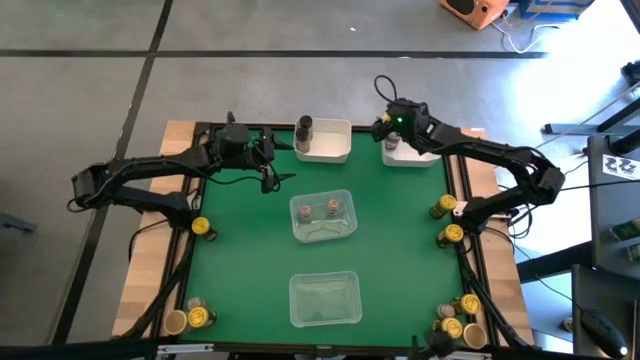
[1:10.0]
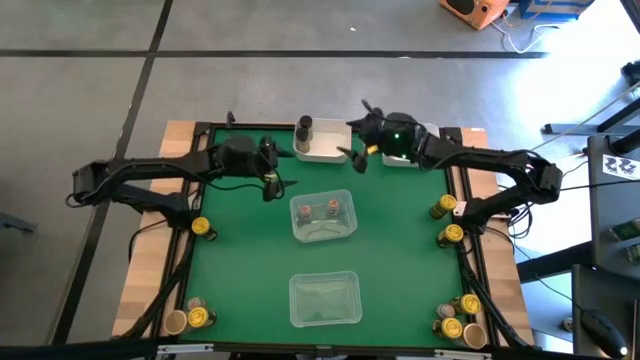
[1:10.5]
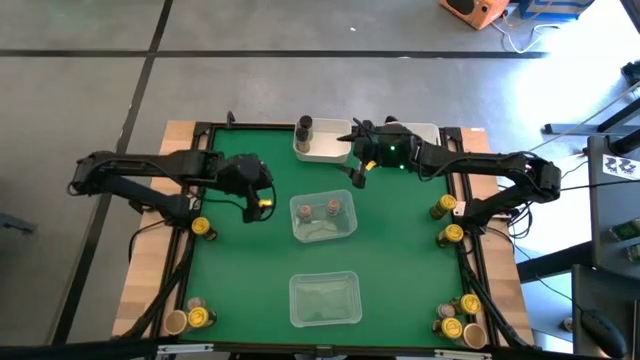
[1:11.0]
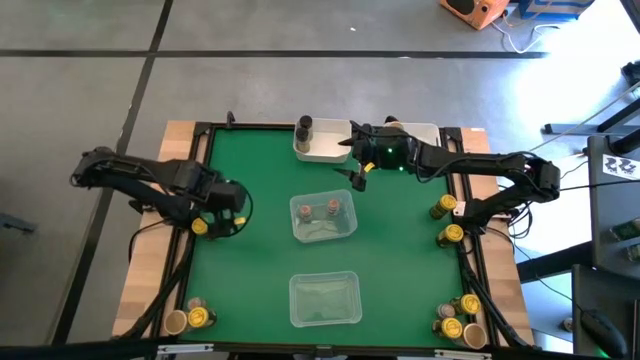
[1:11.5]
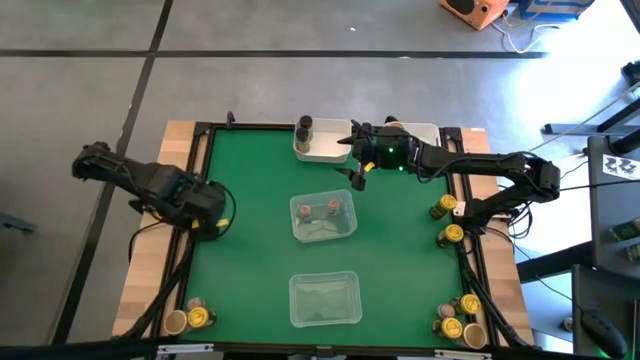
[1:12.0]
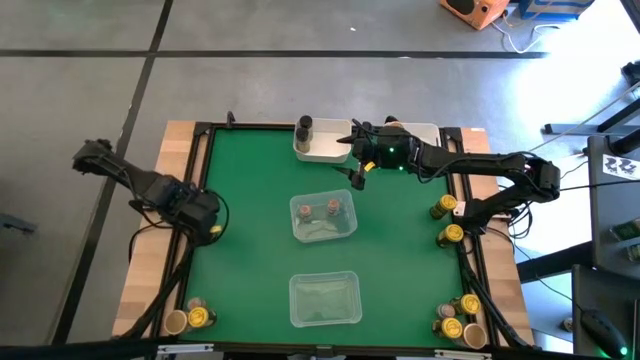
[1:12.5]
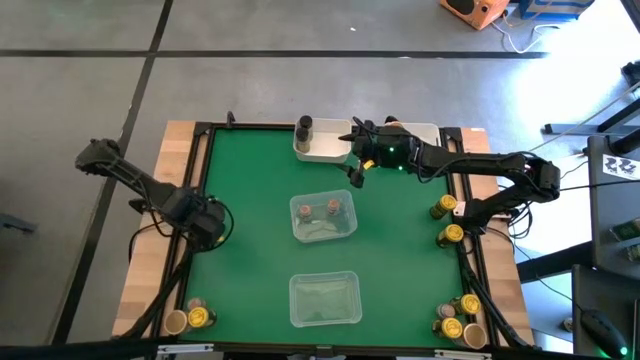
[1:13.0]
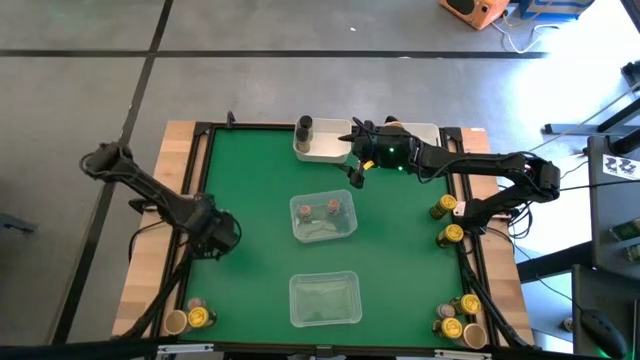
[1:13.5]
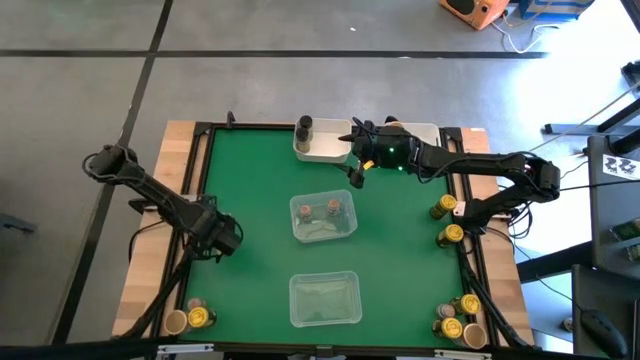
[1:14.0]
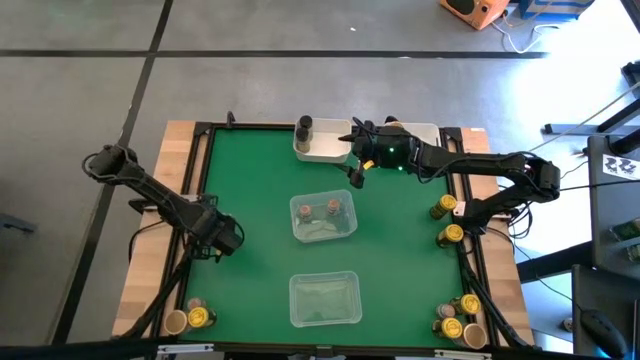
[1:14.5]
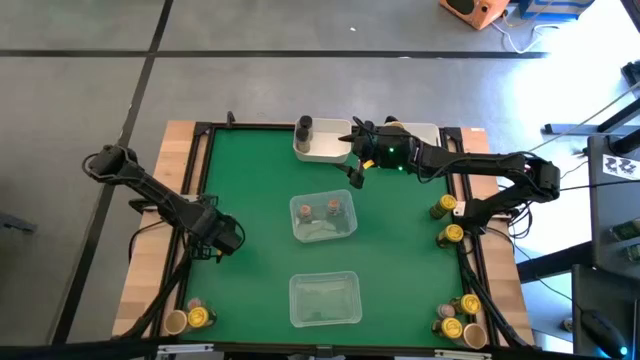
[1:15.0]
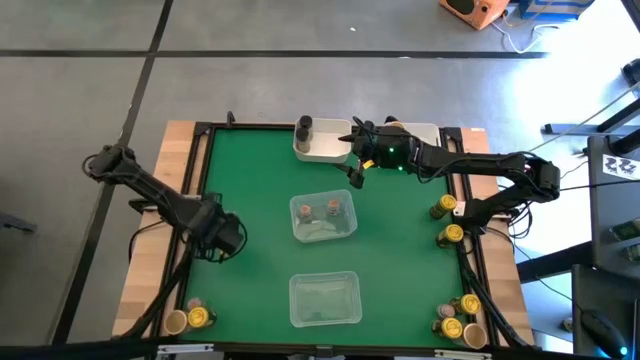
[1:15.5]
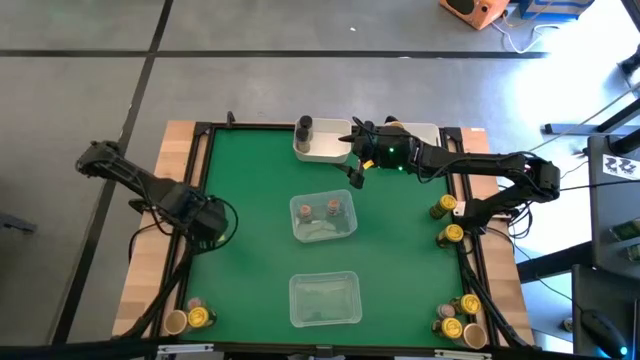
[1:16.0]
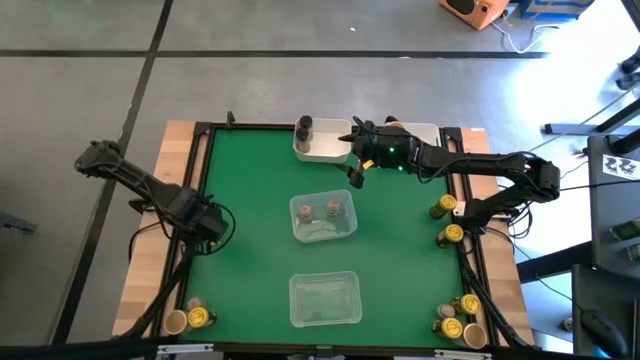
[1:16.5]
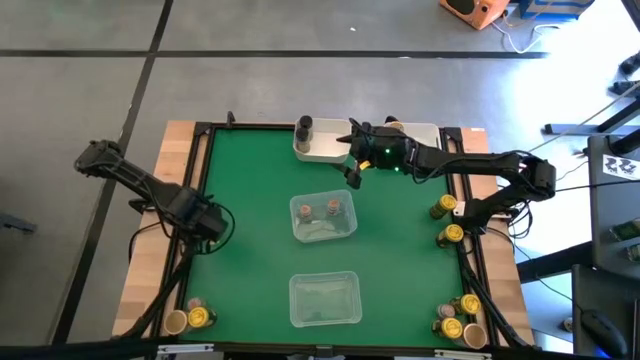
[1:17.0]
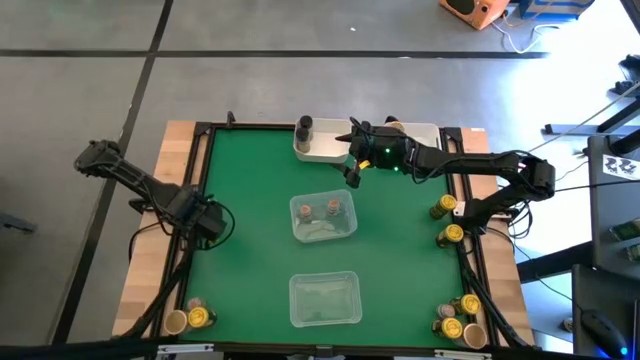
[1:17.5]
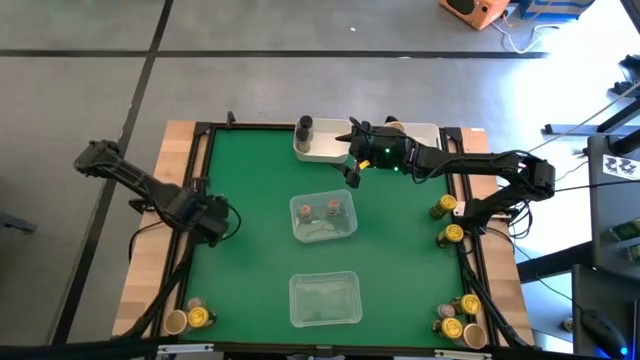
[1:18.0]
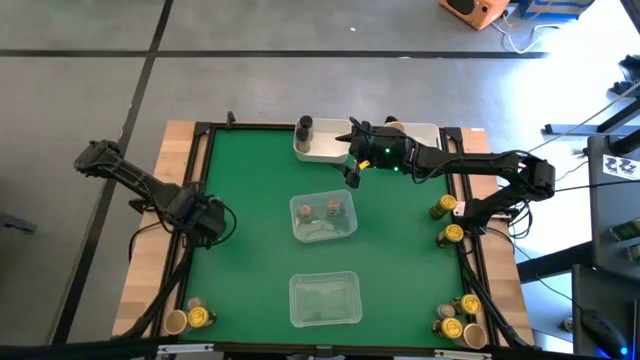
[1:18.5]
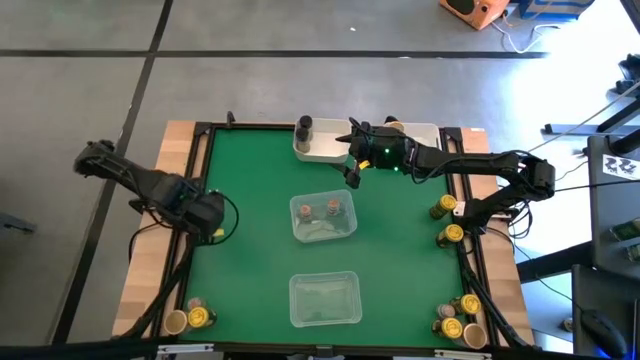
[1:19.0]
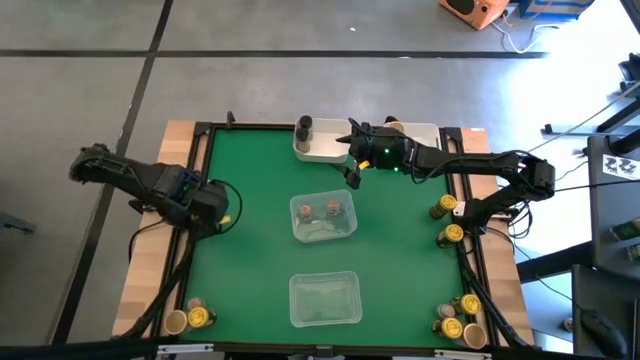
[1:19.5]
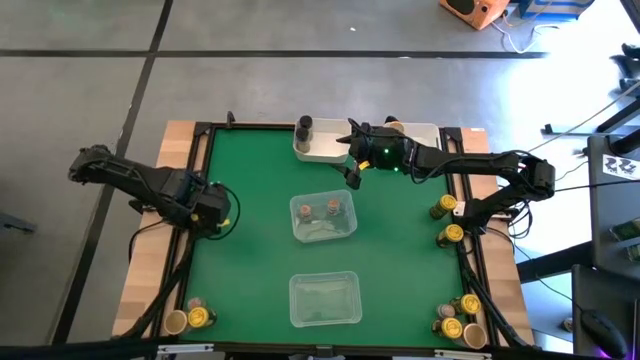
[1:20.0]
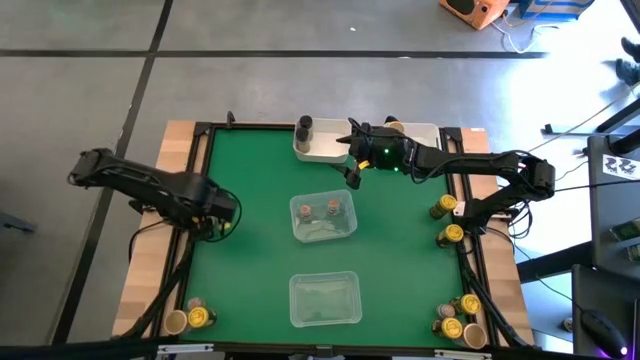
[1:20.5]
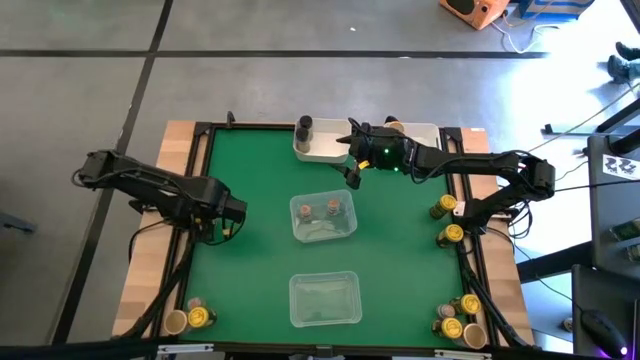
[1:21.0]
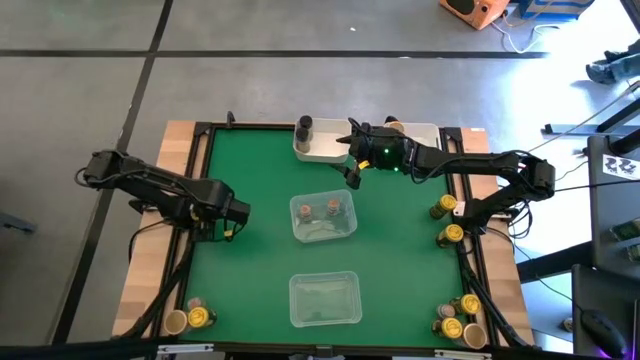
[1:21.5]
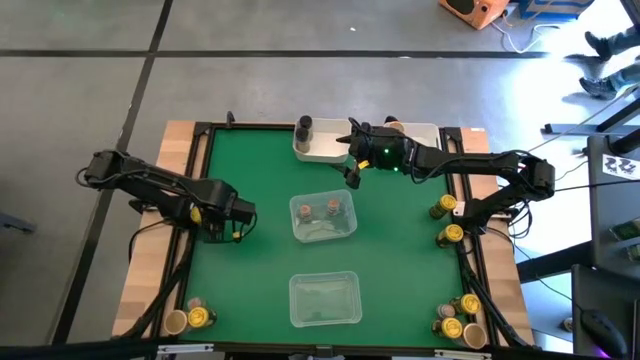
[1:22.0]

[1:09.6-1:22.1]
Task: Sort spices by type
Put the middle left yellow seasoning bottle into the bottom transparent bin

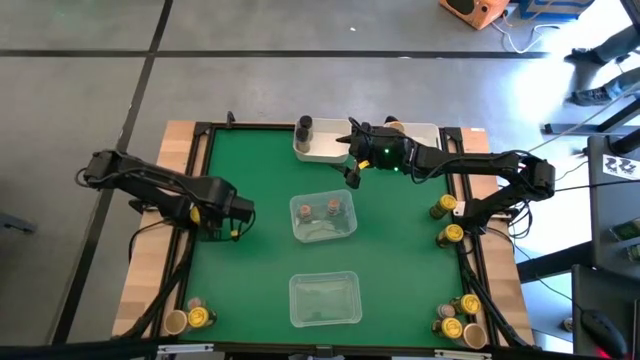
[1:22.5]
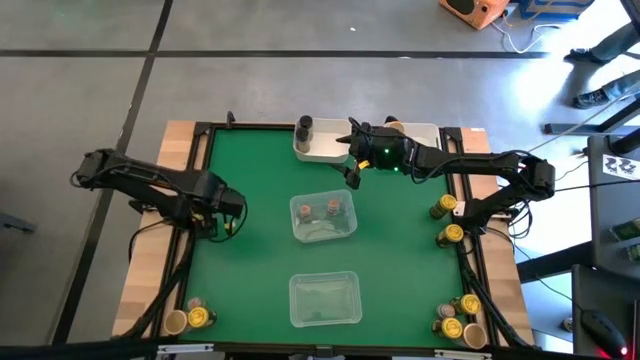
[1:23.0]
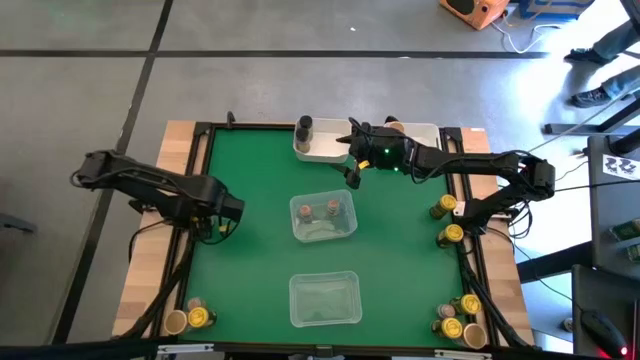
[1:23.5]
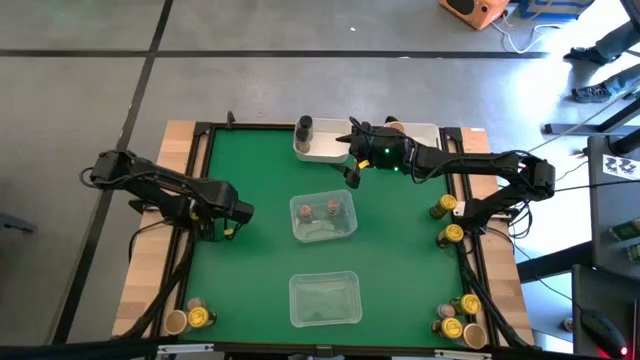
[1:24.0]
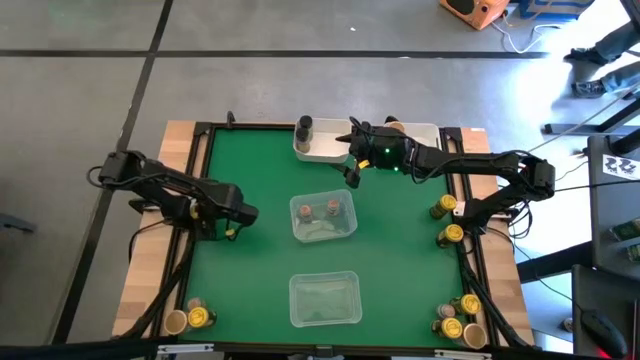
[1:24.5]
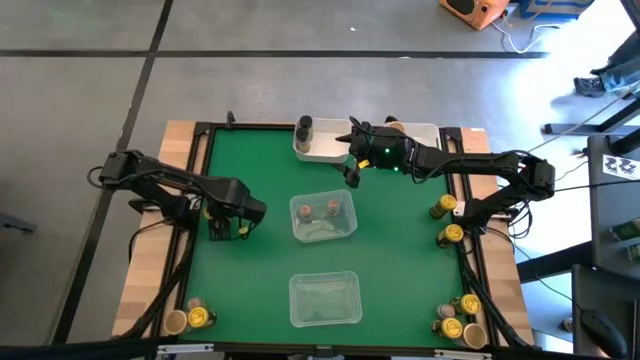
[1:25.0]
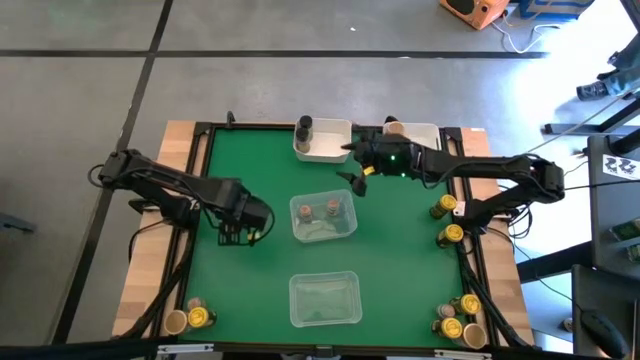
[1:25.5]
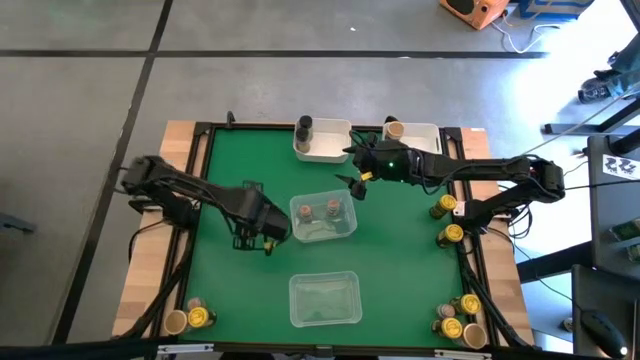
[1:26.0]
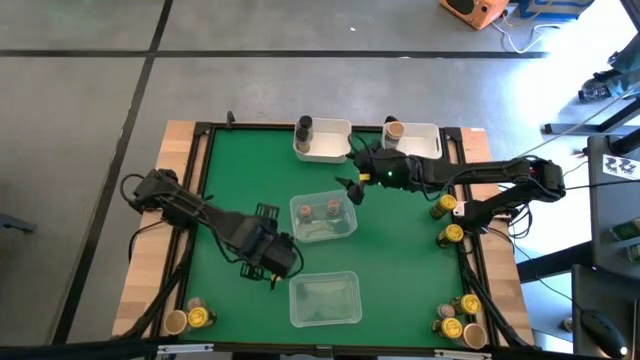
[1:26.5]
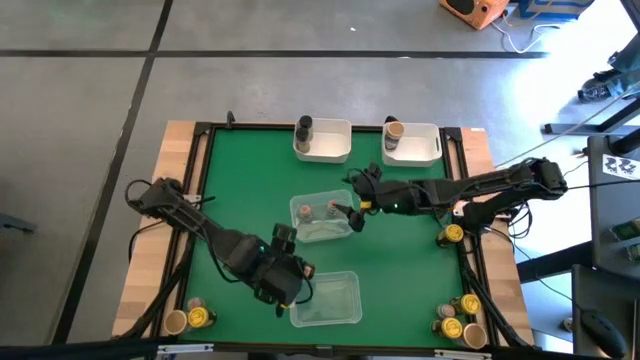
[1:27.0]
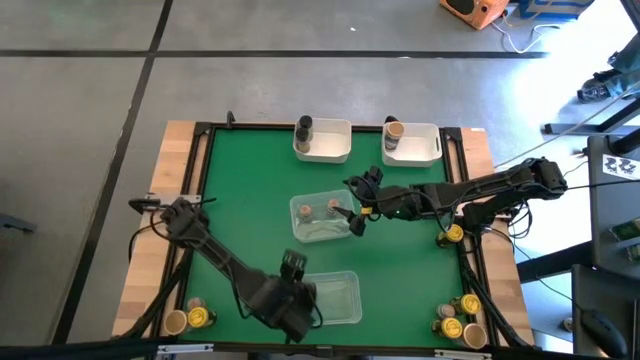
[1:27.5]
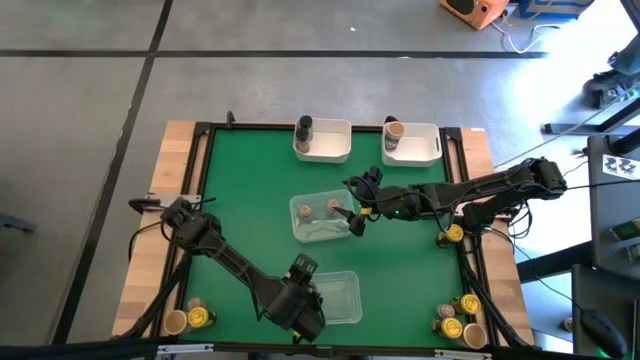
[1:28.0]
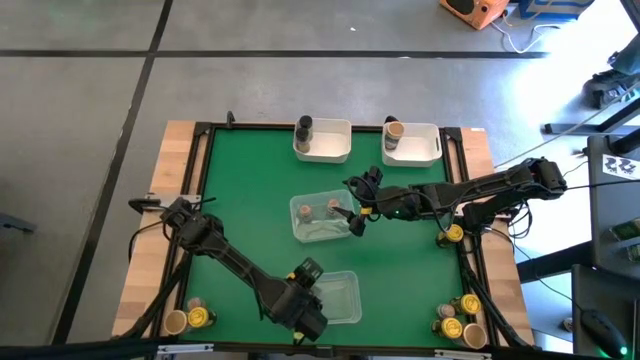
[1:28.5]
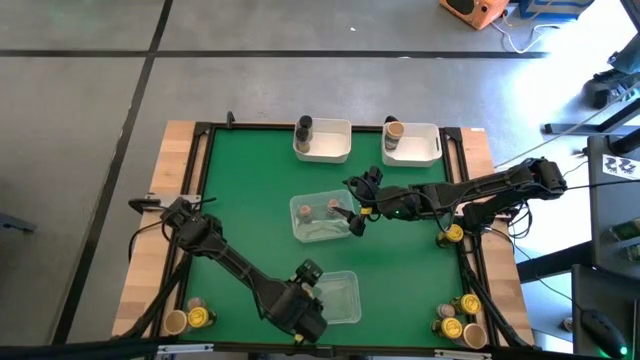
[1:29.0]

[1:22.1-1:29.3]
Put the middle left yellow seasoning bottle into the bottom transparent bin

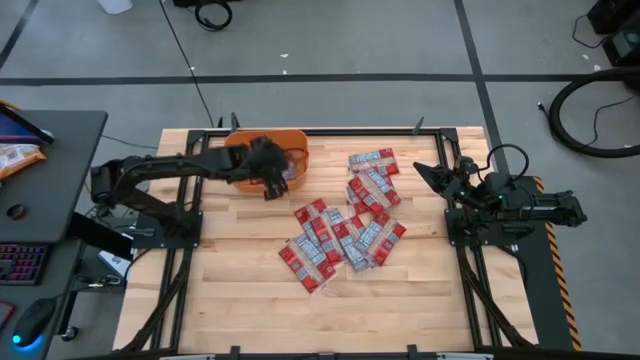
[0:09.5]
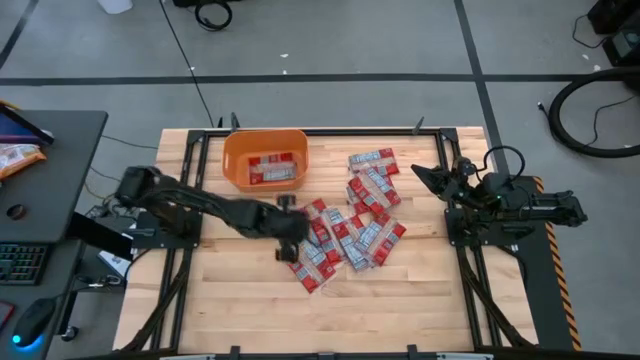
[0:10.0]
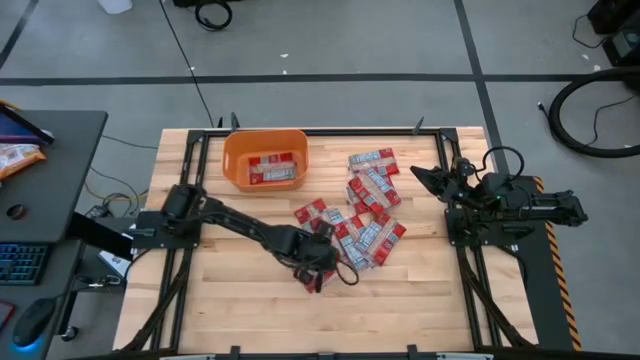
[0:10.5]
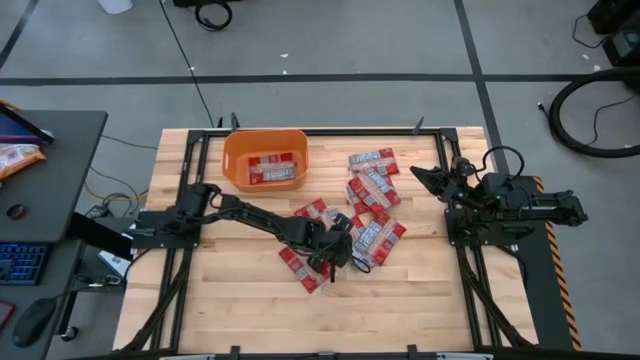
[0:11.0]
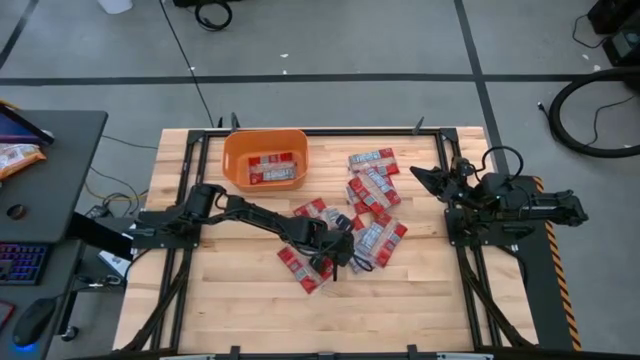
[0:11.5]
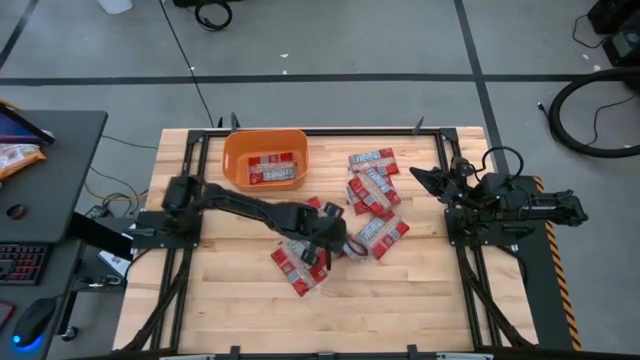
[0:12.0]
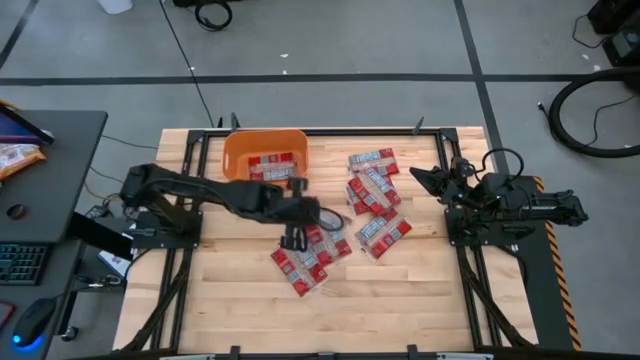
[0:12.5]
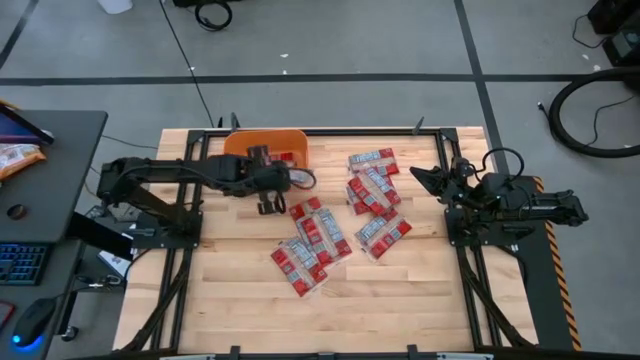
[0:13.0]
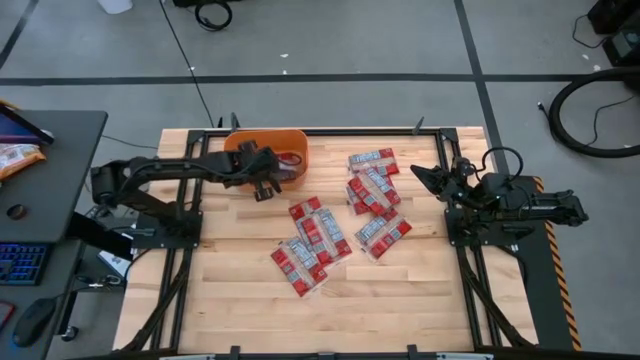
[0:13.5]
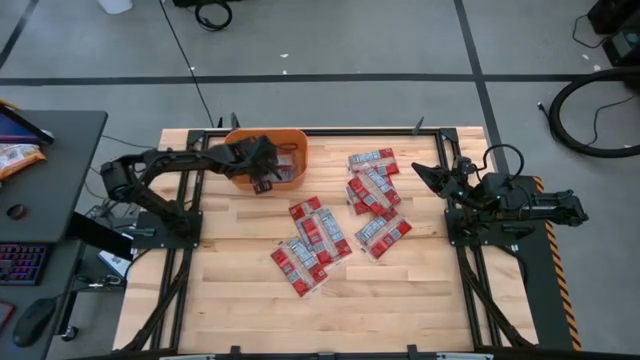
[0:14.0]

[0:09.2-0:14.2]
Task: Sort popcorn bags into baskets
Put the red popcorn bag into the orange container
